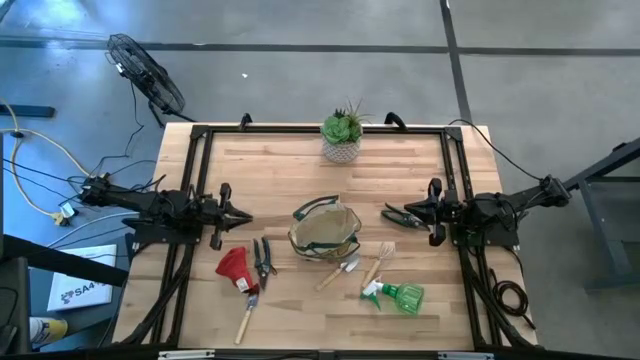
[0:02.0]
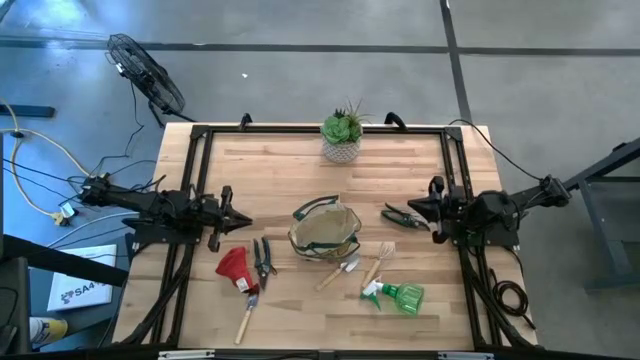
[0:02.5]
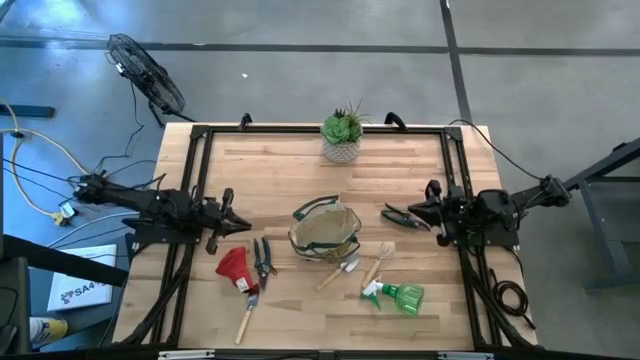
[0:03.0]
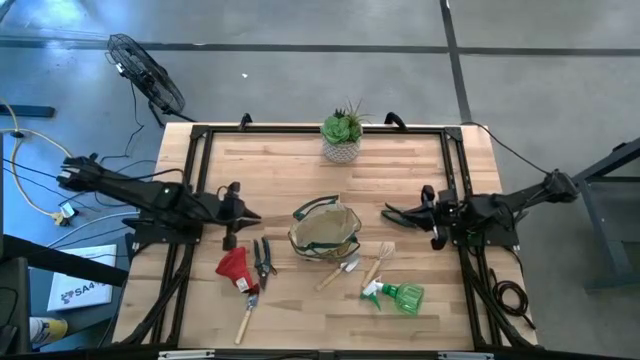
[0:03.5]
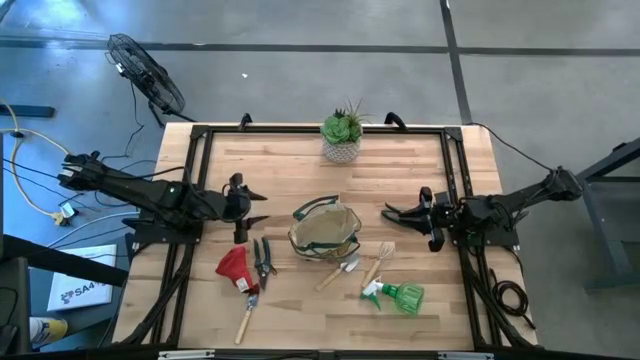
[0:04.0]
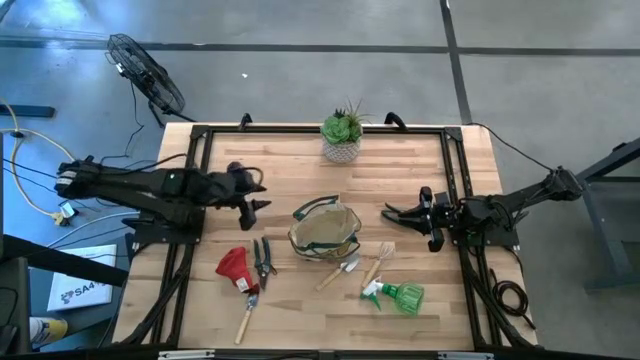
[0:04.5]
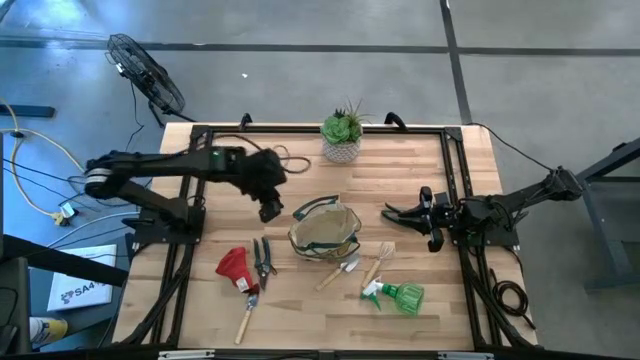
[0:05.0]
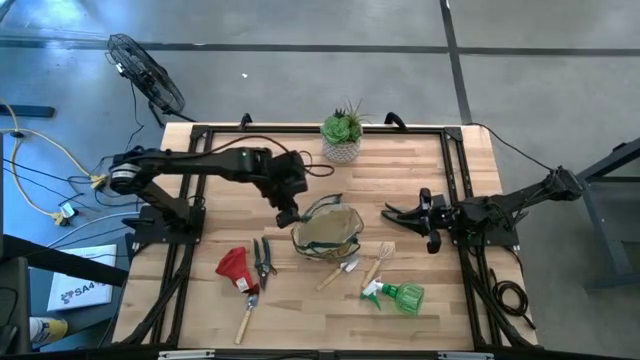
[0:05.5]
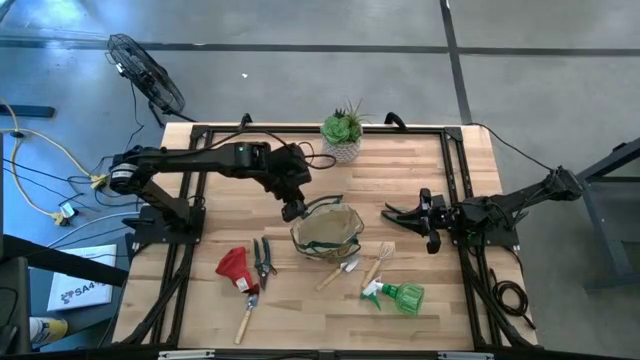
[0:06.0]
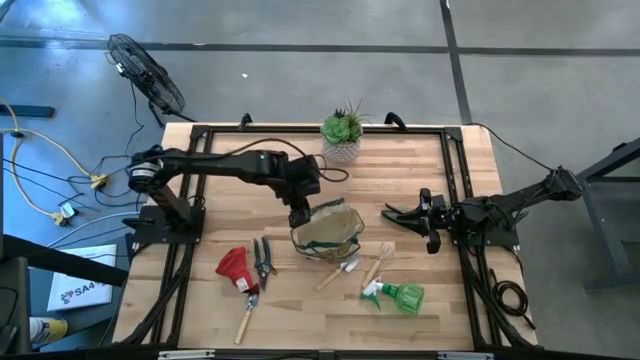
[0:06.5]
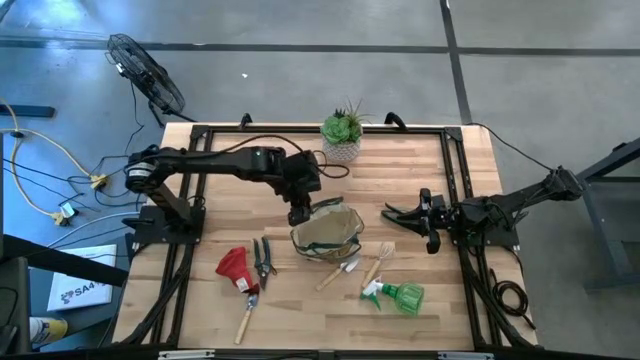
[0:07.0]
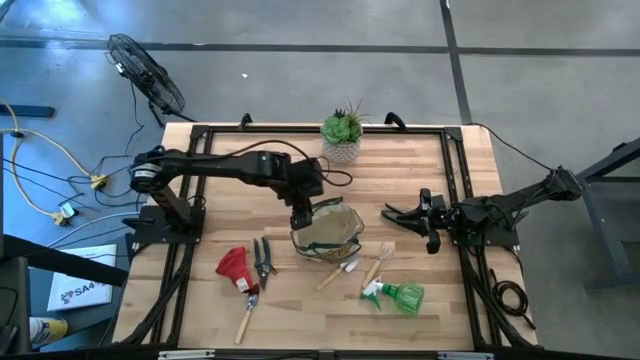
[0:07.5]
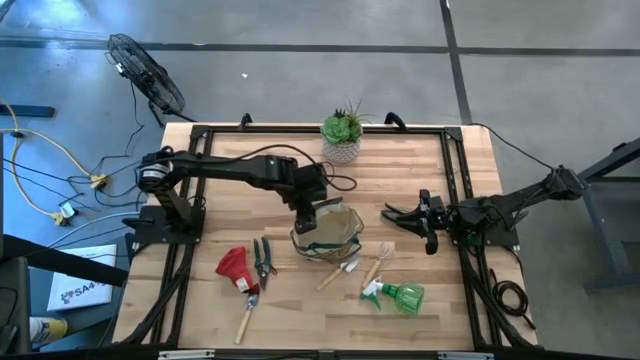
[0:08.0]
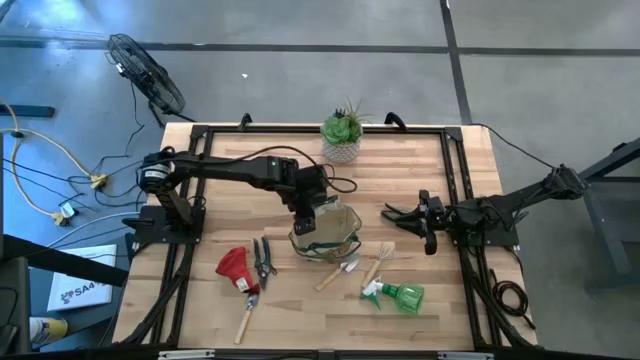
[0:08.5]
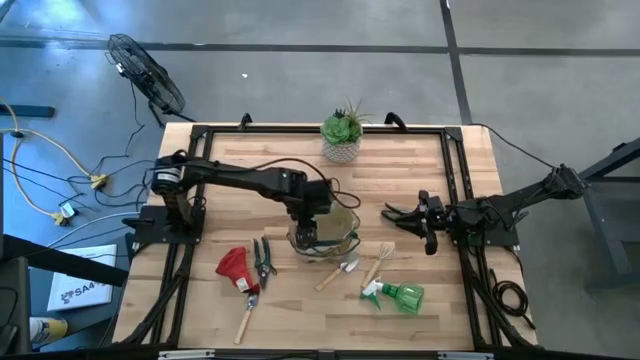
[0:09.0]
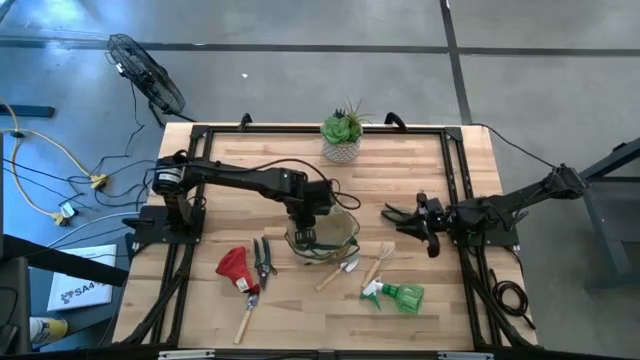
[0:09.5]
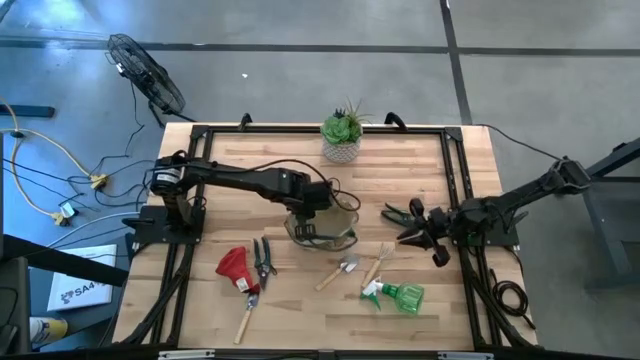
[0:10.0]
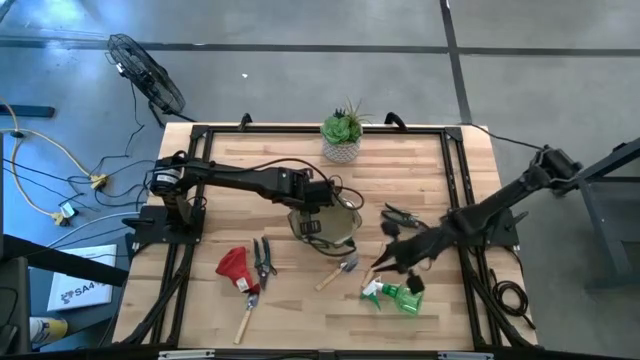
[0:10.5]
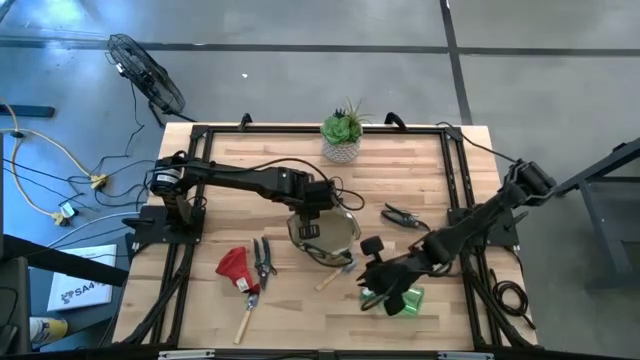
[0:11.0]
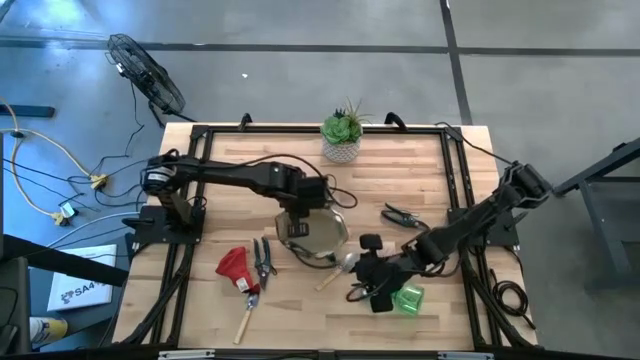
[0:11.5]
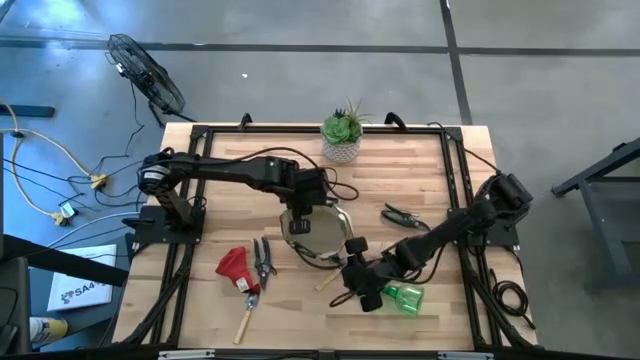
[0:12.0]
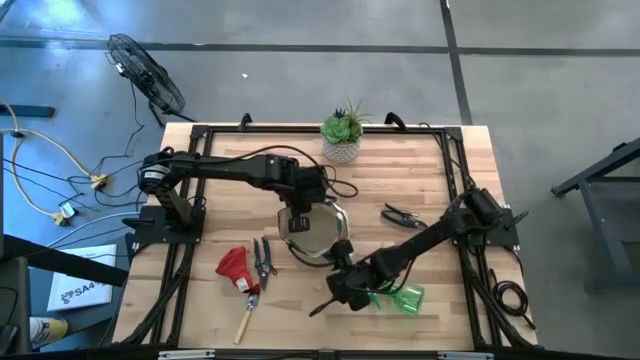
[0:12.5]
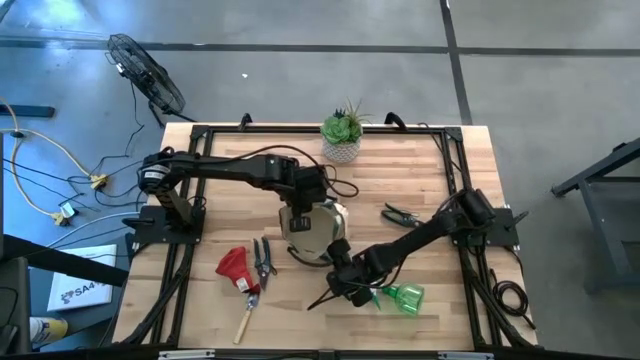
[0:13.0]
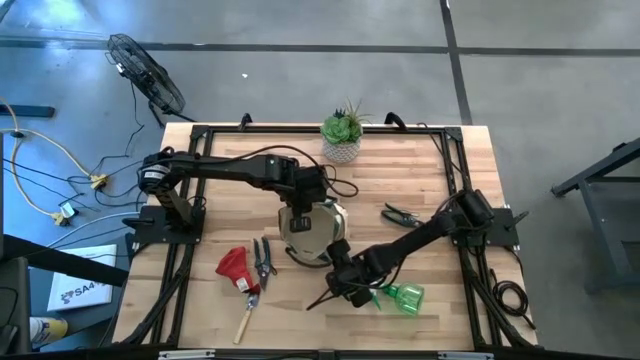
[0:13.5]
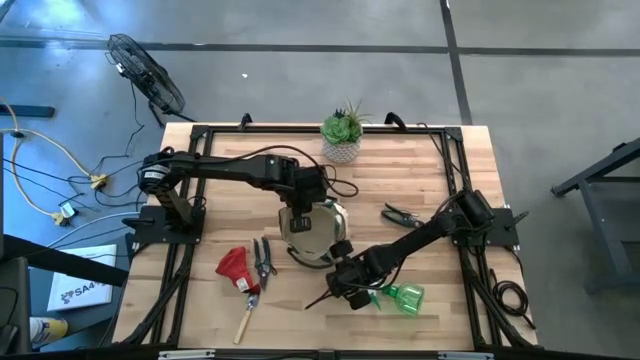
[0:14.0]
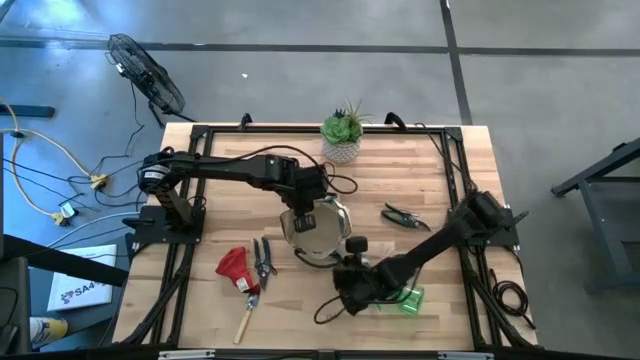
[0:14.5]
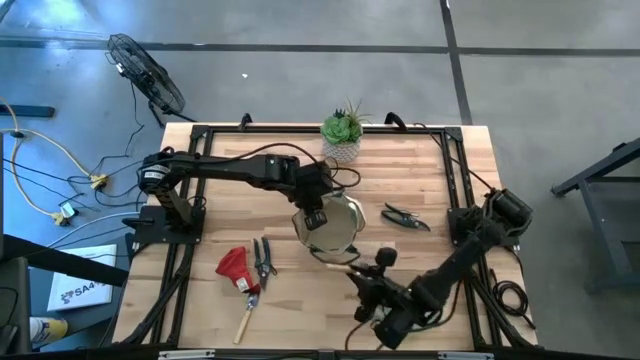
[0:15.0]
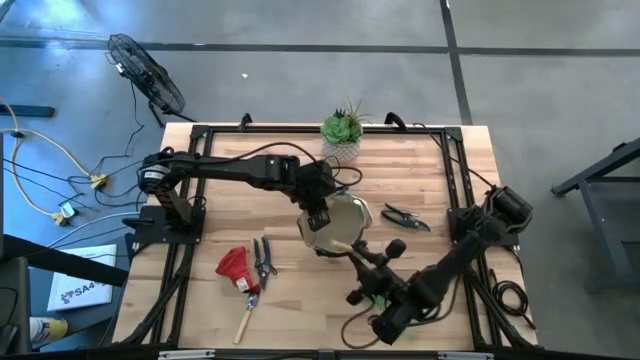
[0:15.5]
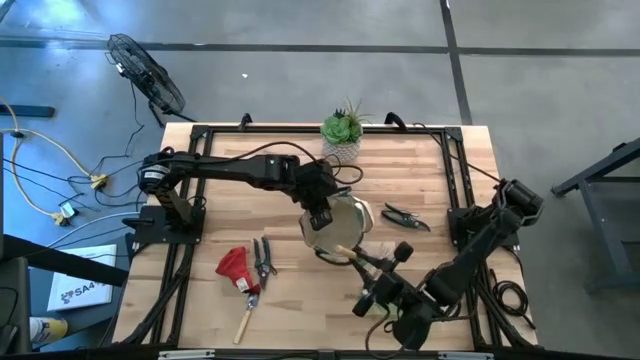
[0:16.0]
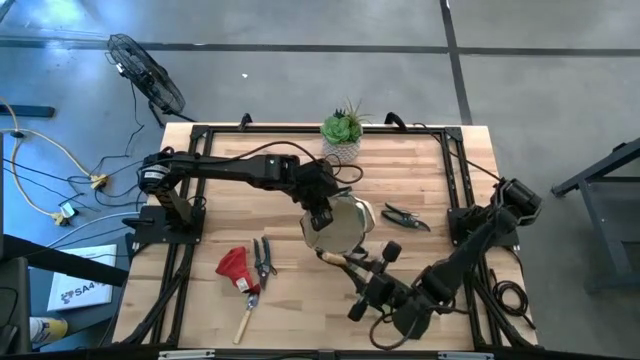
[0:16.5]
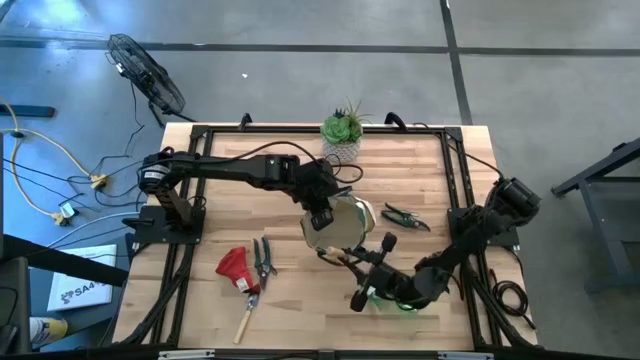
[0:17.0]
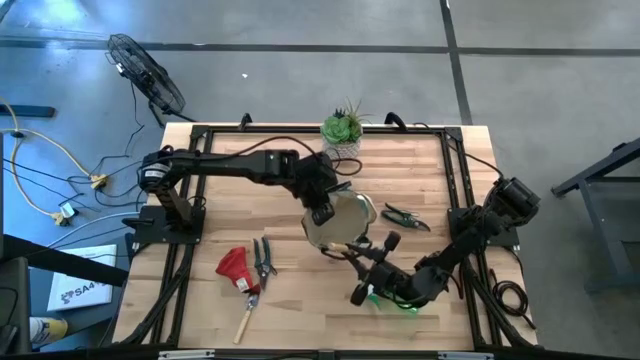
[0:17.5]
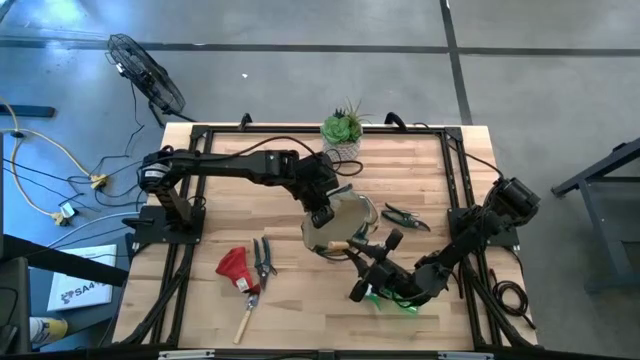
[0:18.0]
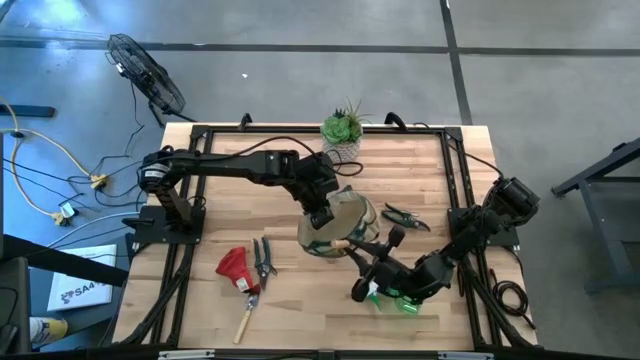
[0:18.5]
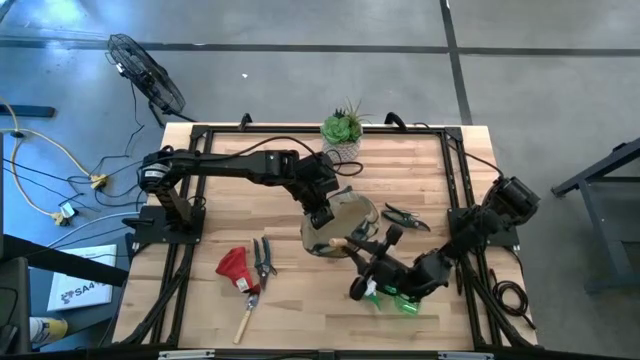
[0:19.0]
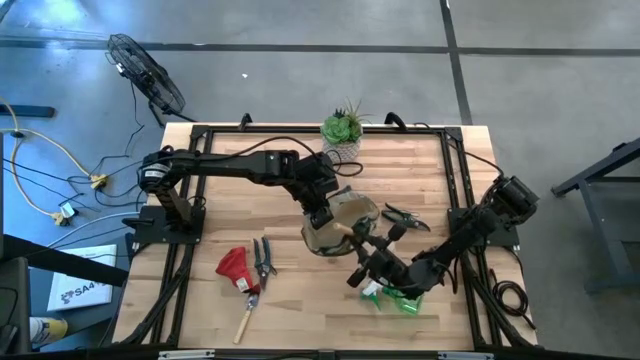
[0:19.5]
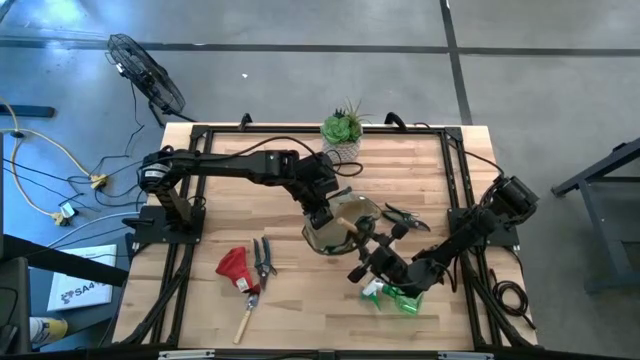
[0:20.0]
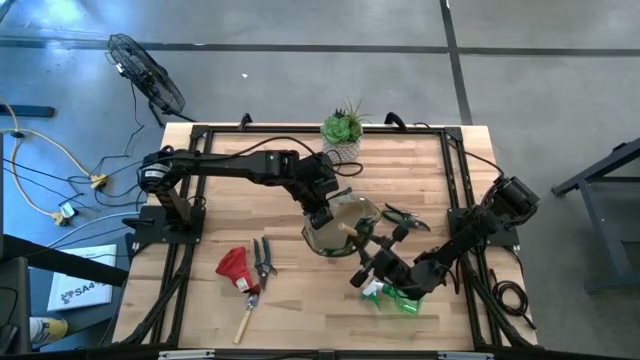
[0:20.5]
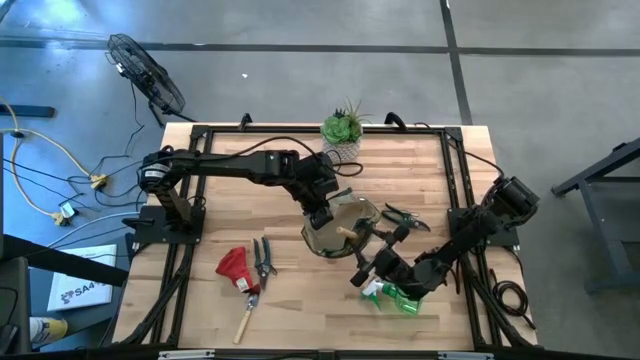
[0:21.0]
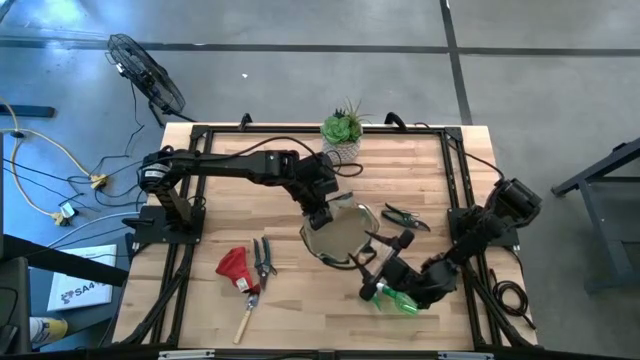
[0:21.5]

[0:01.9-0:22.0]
Task: Pick & Place Garden tools in Gardening bag
Put the top right trowel into the gardening bag

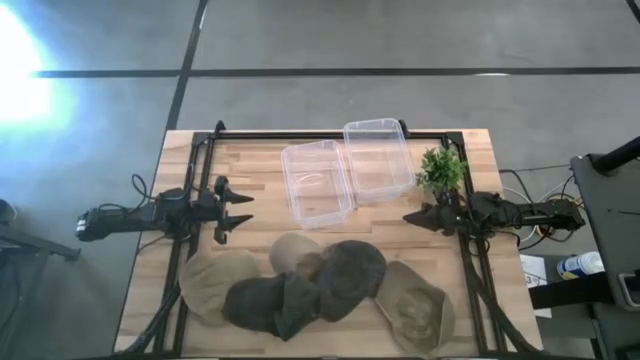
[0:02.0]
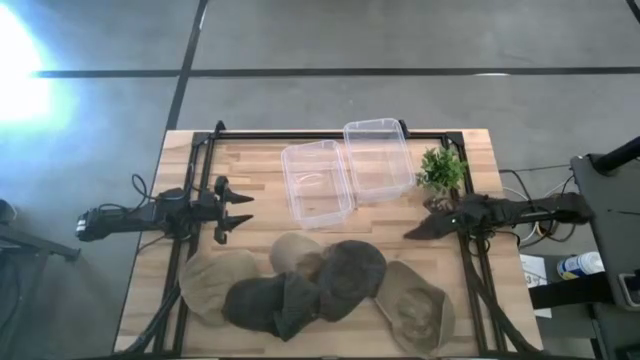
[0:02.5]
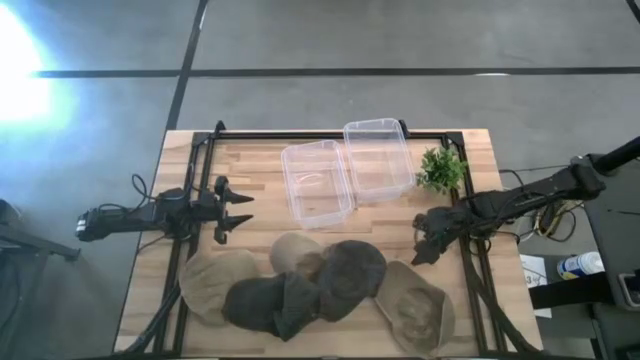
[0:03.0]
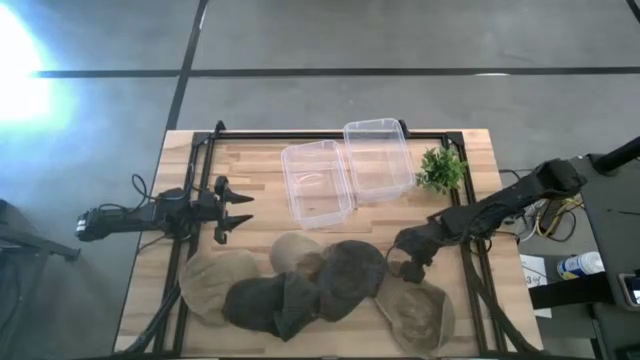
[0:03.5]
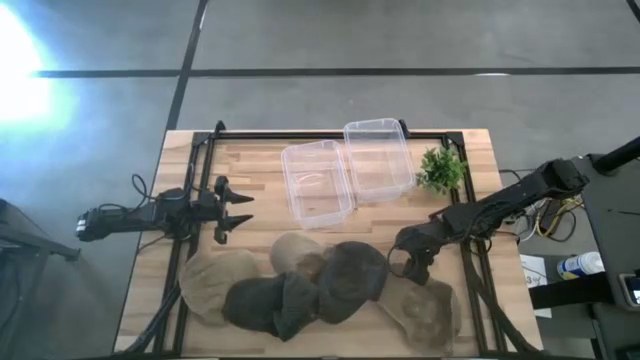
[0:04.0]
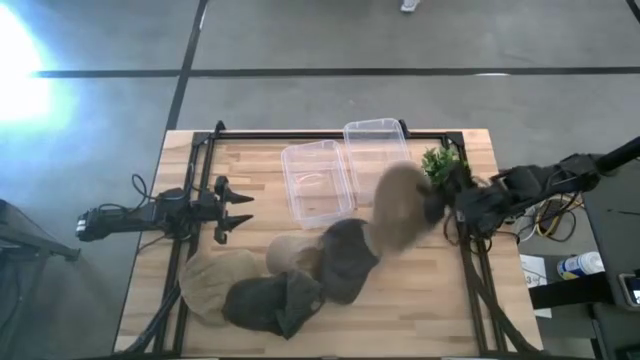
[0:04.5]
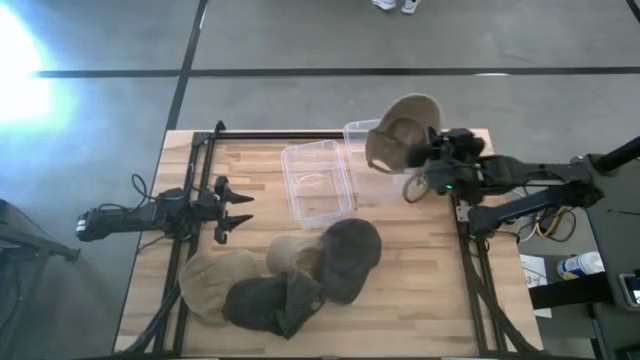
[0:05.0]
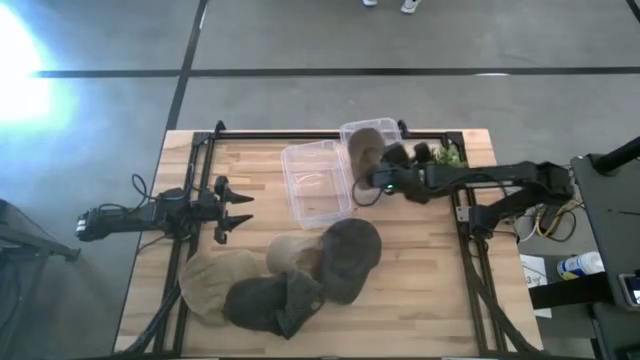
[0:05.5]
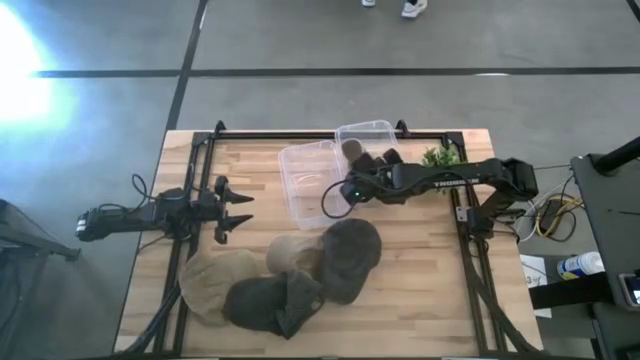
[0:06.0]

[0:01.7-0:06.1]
Task: Pick & Place hat
Put the right brown cap into the right transparent bin
